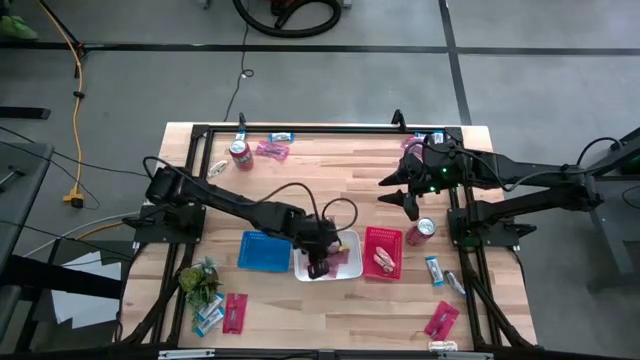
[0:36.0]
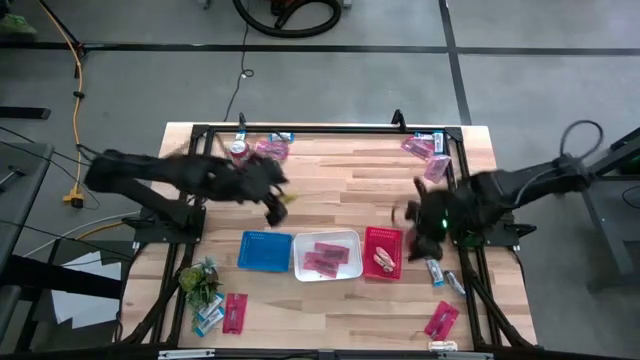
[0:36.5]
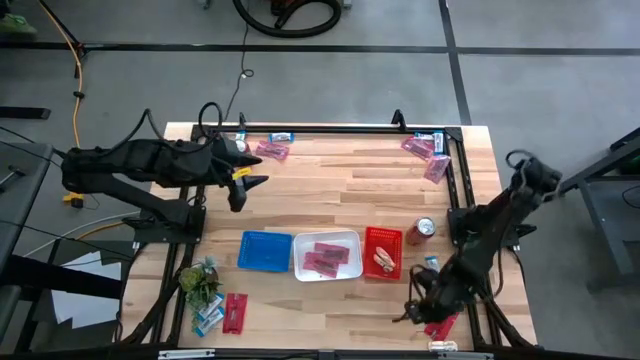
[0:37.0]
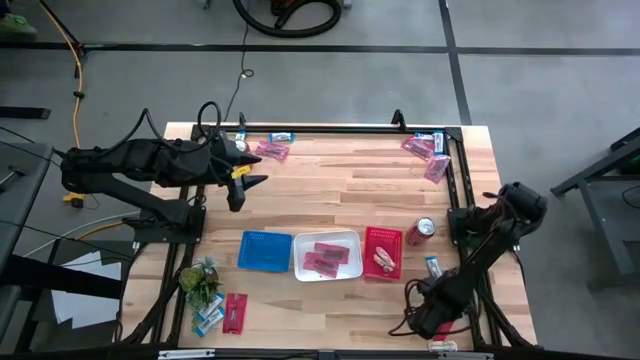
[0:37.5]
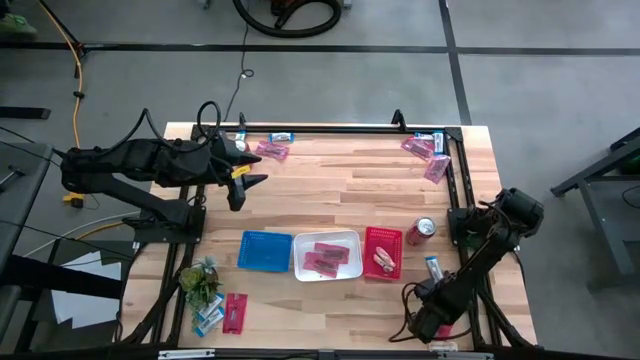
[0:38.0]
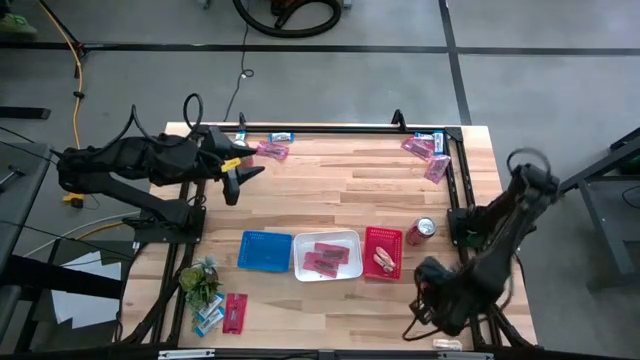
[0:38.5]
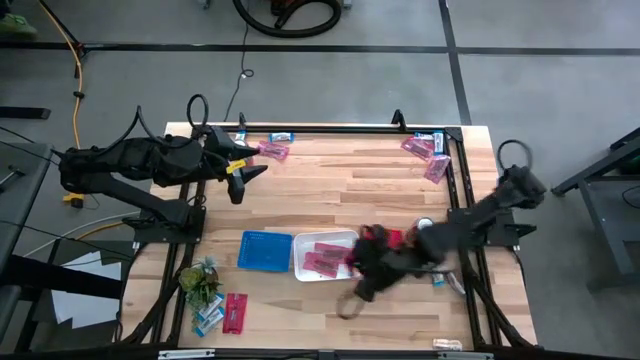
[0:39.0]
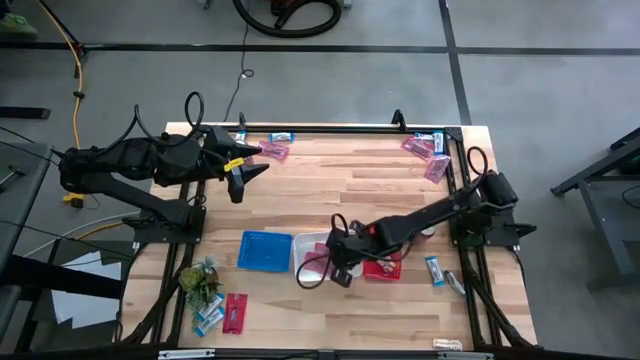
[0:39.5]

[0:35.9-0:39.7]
Task: Sort candy
Put the red candy into the white bin

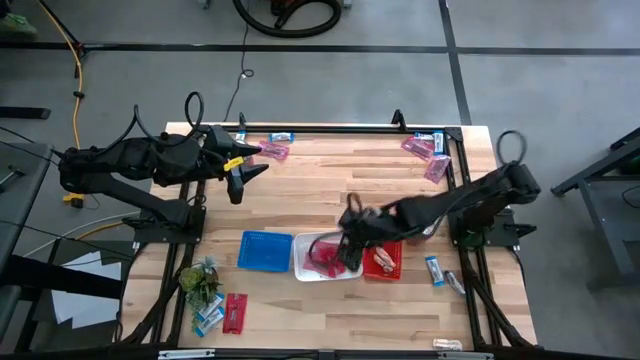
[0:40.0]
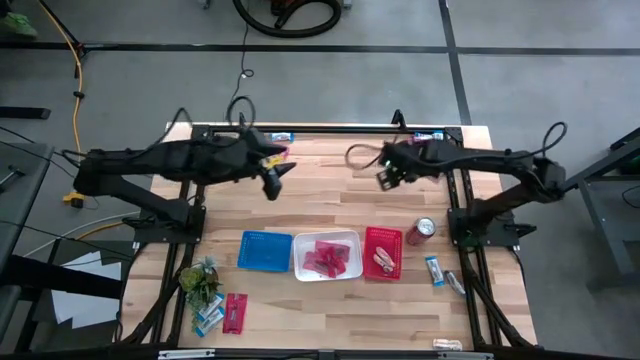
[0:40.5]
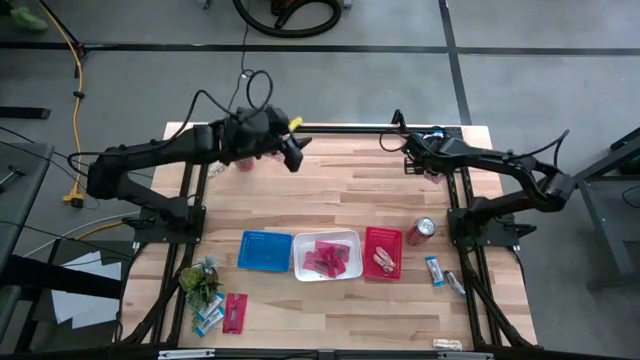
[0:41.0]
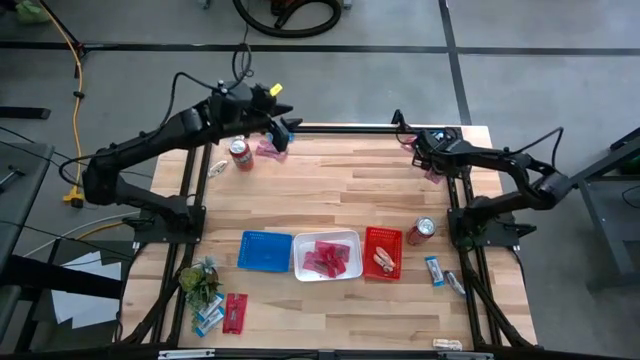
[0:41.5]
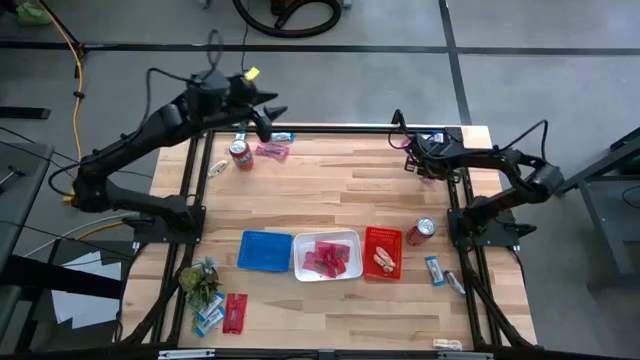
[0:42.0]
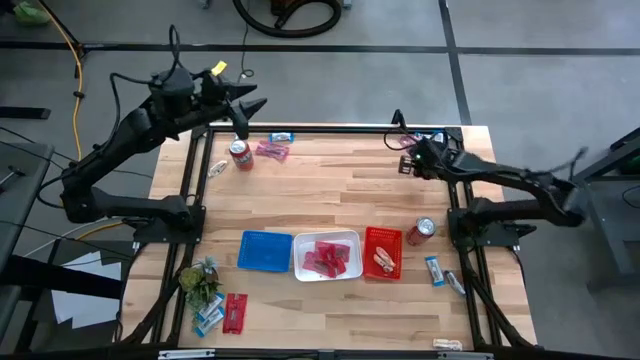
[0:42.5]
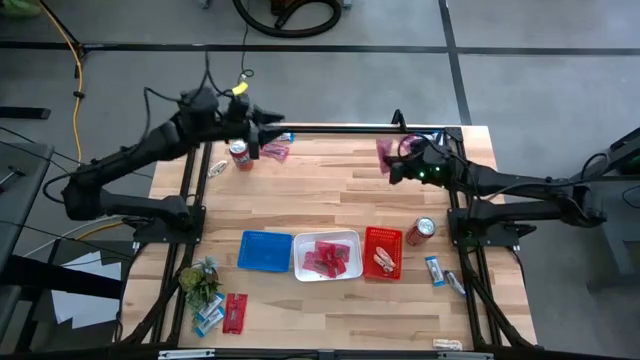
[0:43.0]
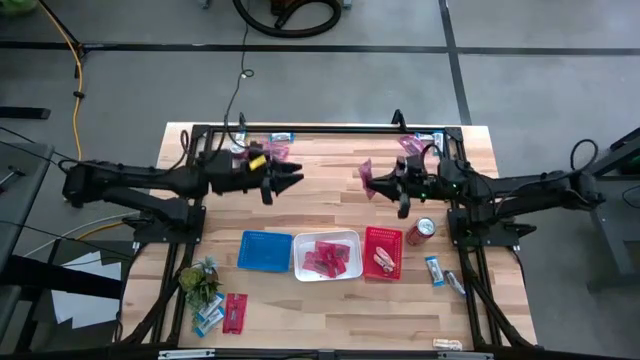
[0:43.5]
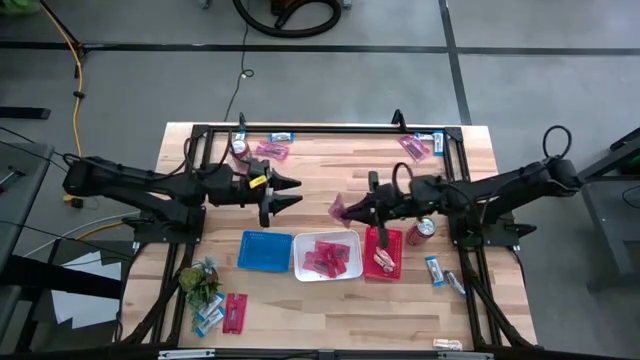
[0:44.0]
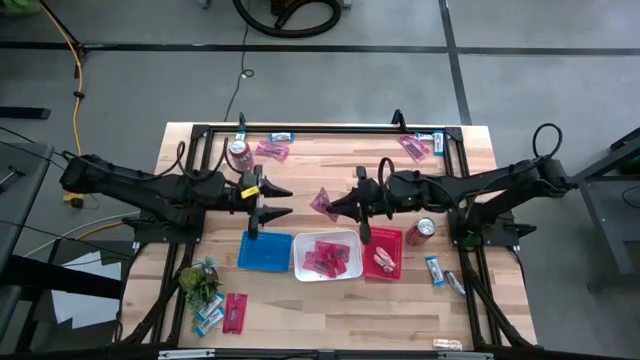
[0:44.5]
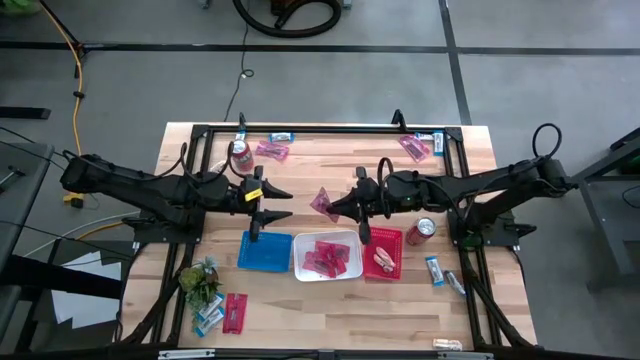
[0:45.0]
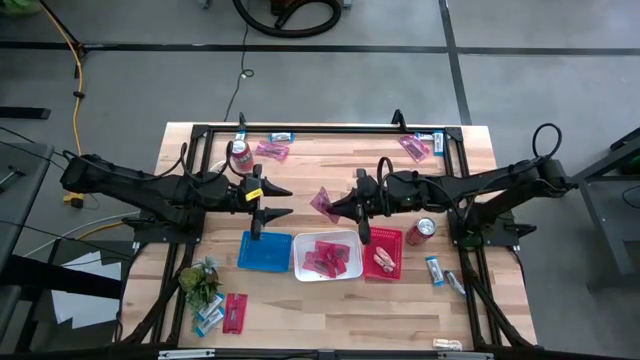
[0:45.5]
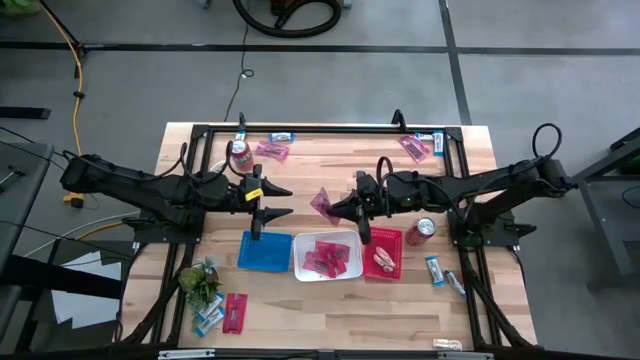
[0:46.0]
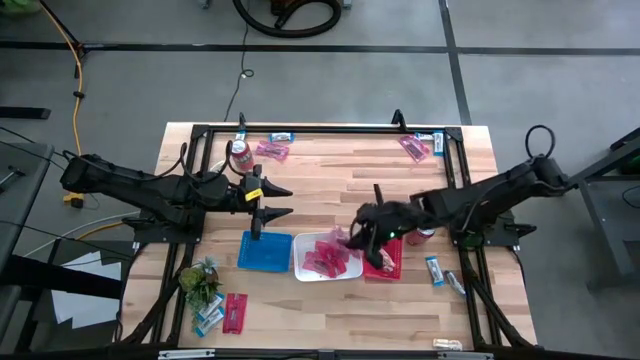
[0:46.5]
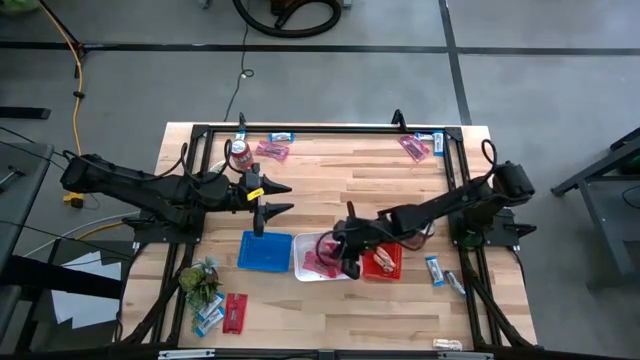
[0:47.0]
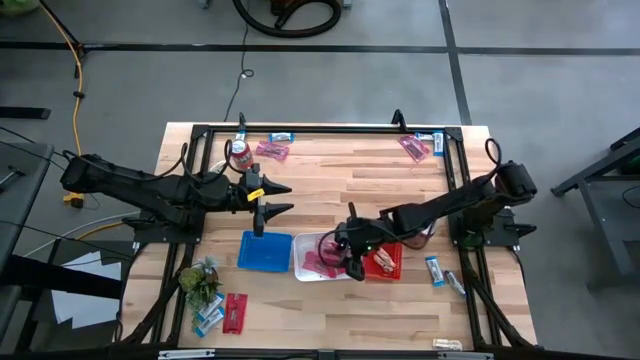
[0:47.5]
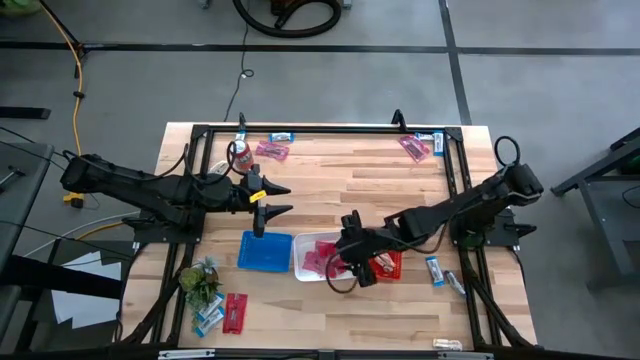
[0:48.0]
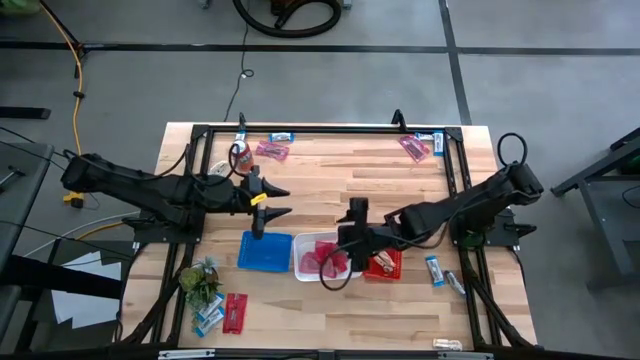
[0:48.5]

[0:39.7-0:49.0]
Put the pink candy into the white bin

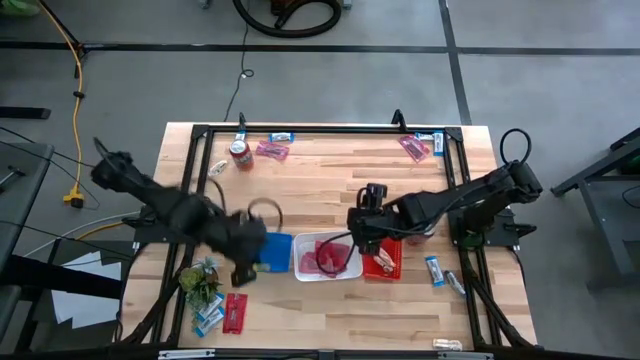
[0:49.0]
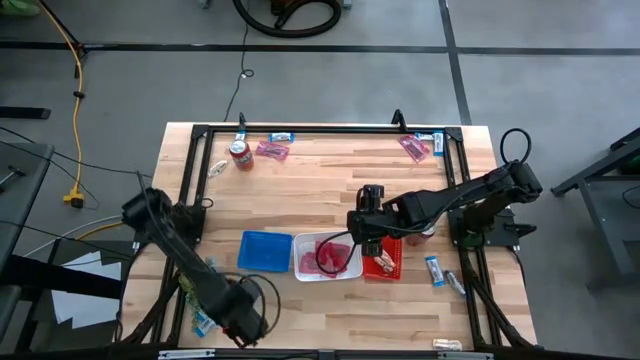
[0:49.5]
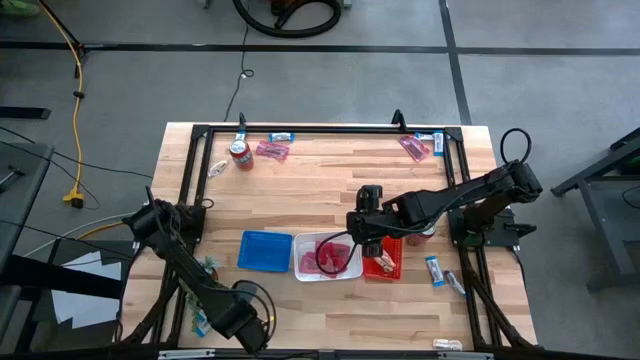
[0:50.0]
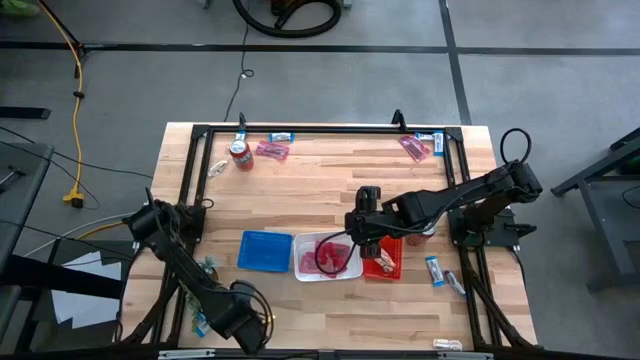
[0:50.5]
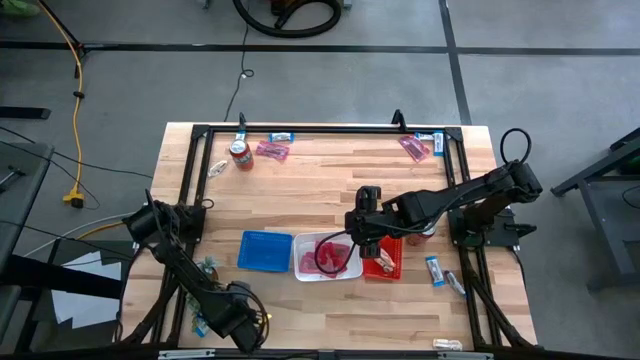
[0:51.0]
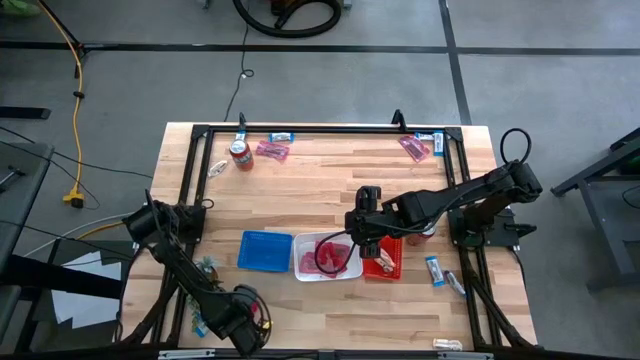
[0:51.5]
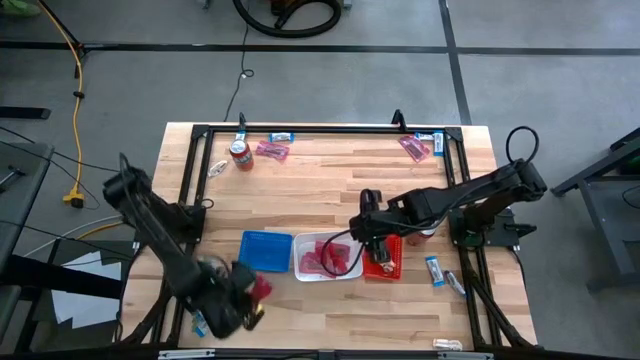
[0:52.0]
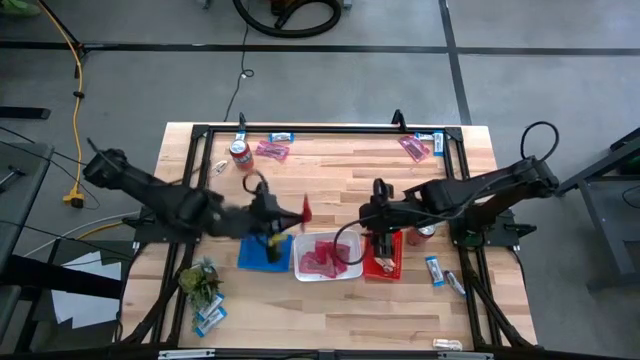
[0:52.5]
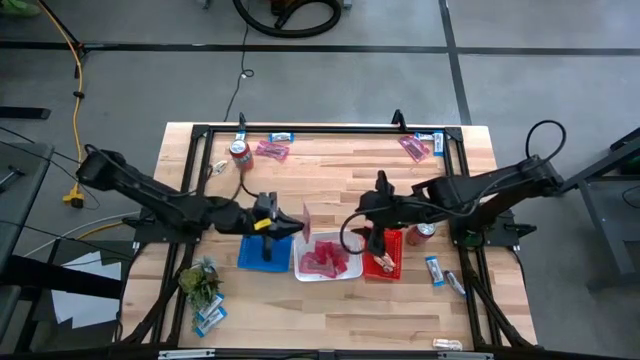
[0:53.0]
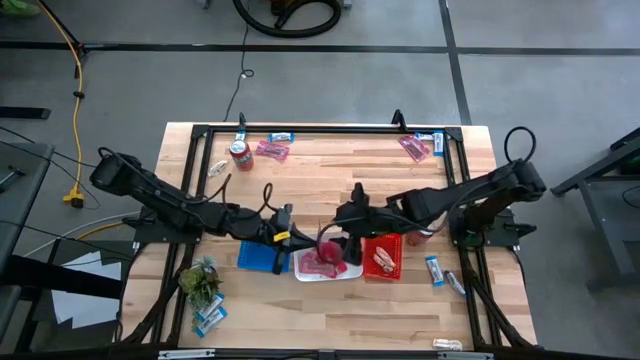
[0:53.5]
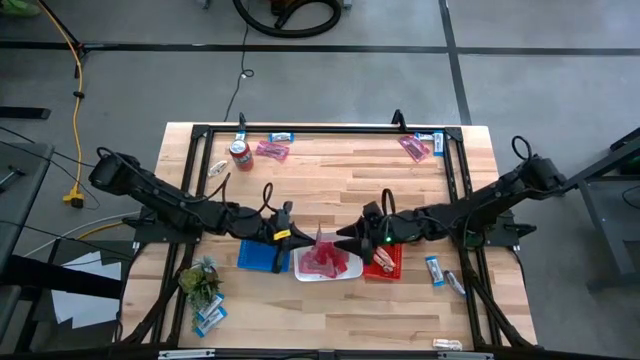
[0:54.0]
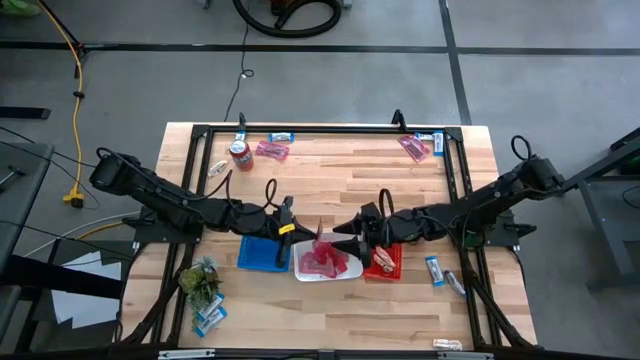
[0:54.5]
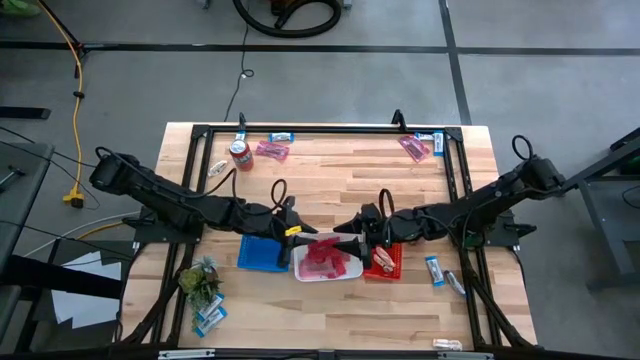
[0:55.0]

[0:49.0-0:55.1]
Put the red candy into the white bin

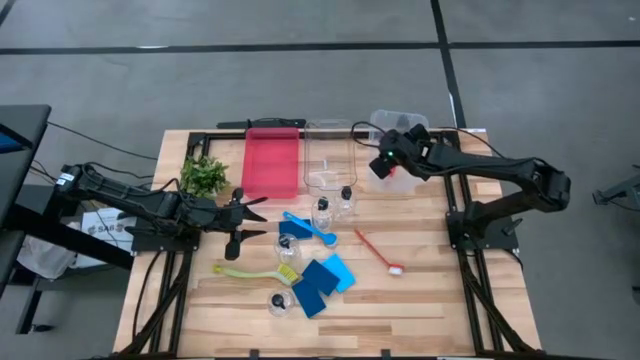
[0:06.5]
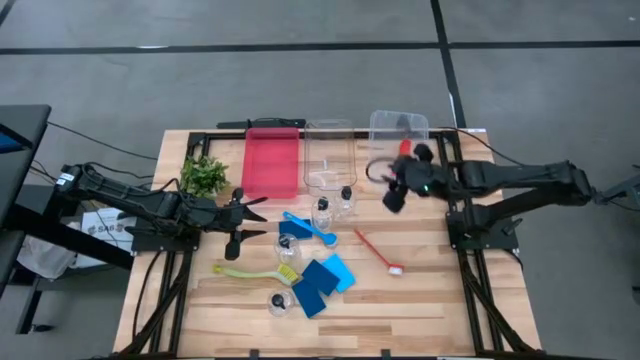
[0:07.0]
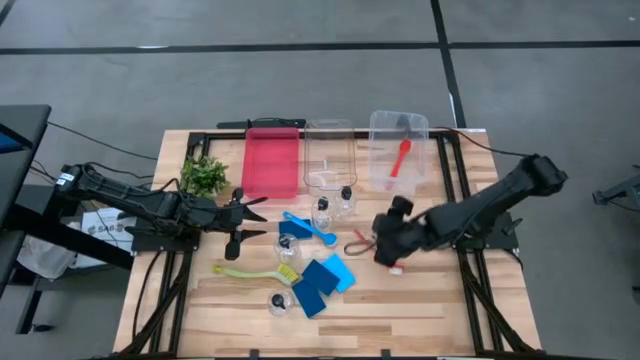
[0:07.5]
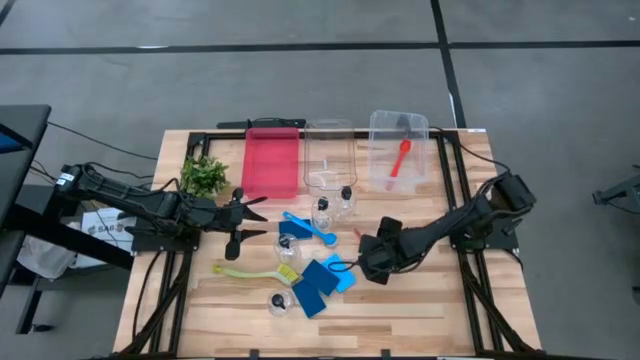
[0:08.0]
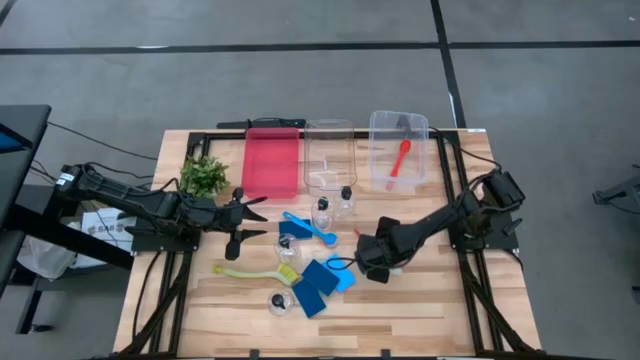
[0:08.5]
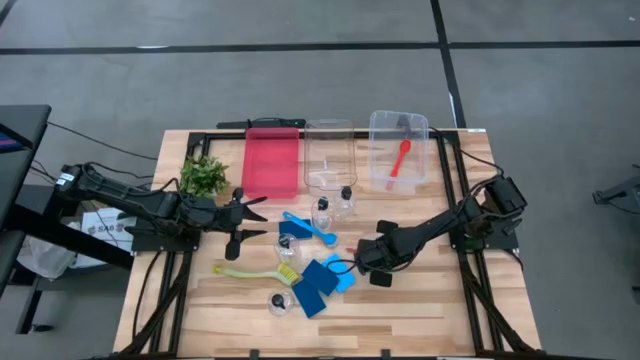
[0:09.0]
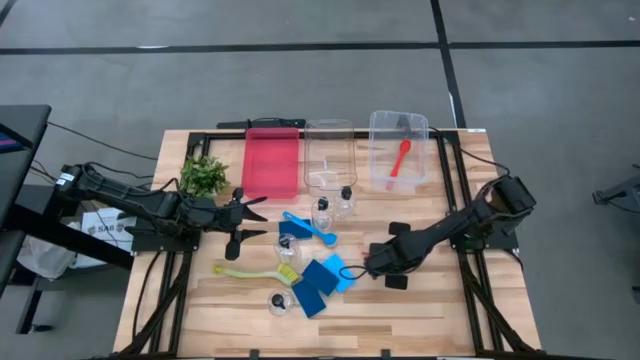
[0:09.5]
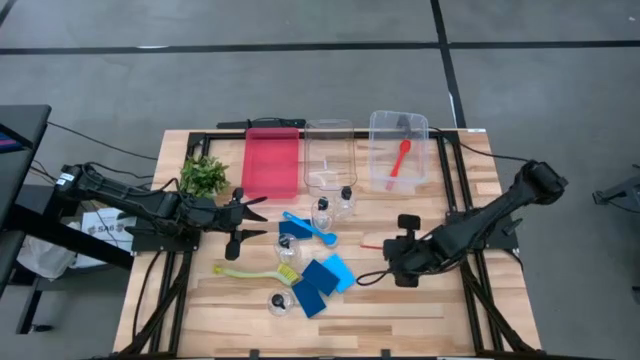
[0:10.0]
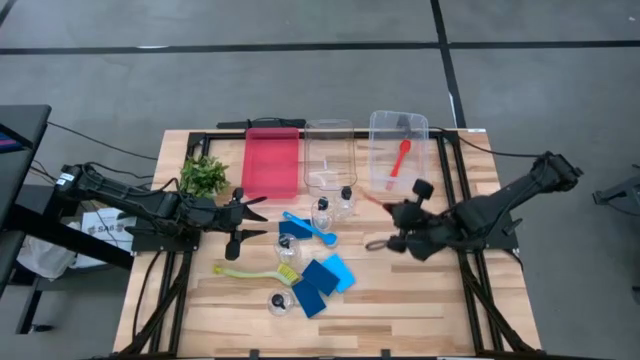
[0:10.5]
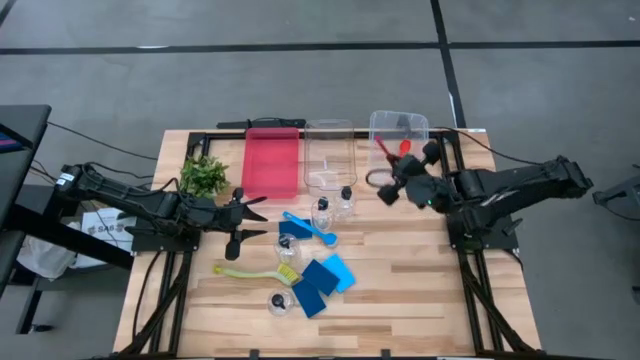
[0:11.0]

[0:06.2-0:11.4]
Task: Pick & Place Kitchen Sink Supplies
Put the red dish brush into the right transparent bin
